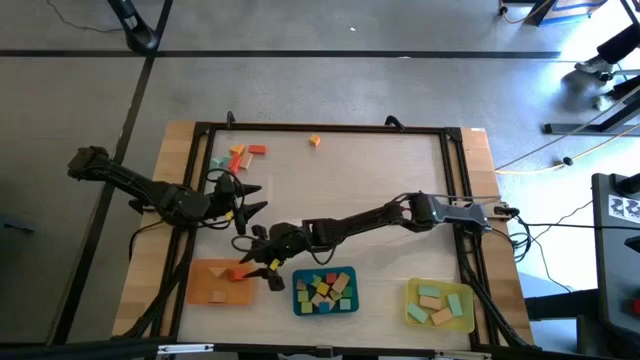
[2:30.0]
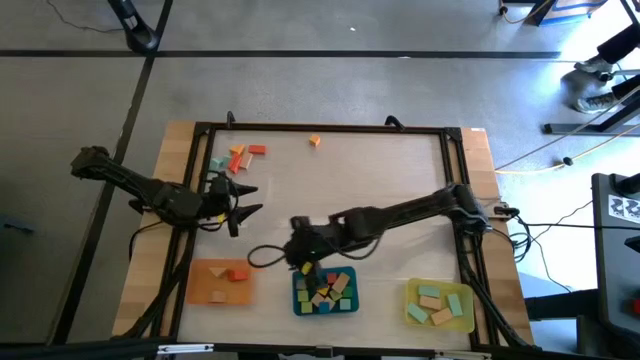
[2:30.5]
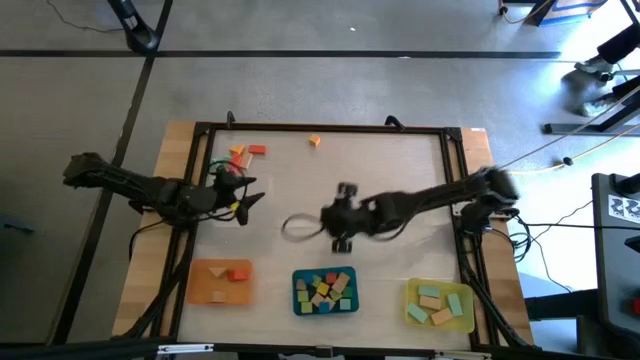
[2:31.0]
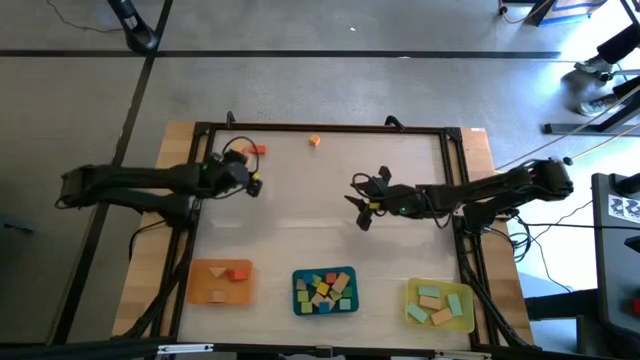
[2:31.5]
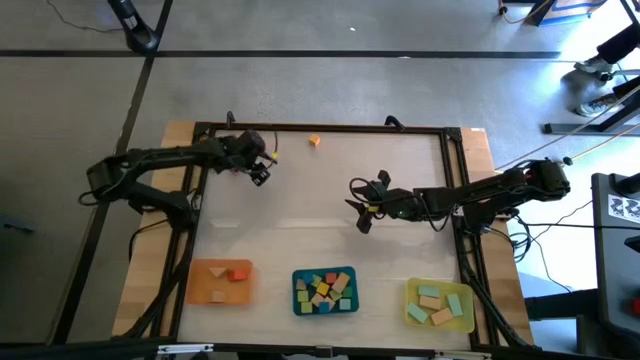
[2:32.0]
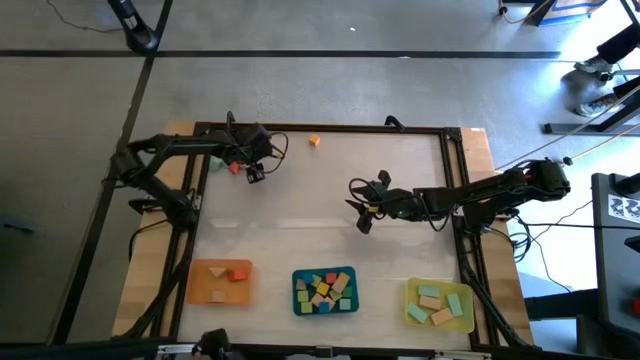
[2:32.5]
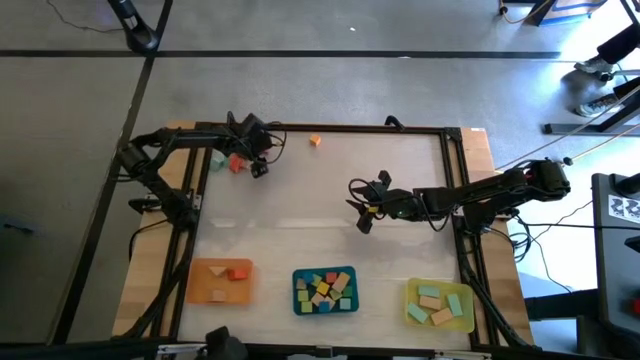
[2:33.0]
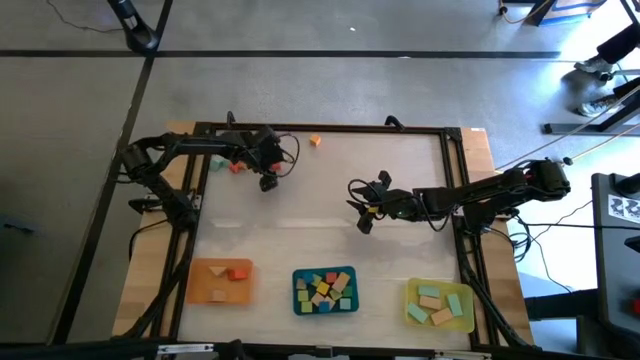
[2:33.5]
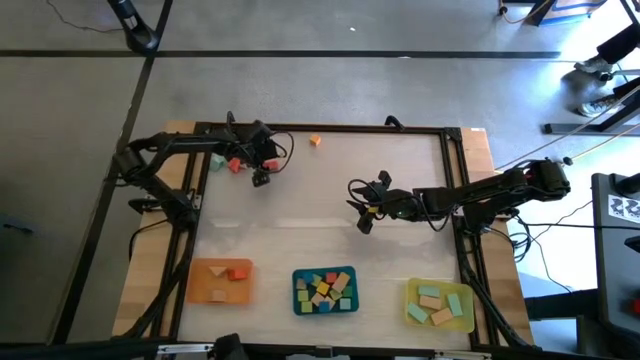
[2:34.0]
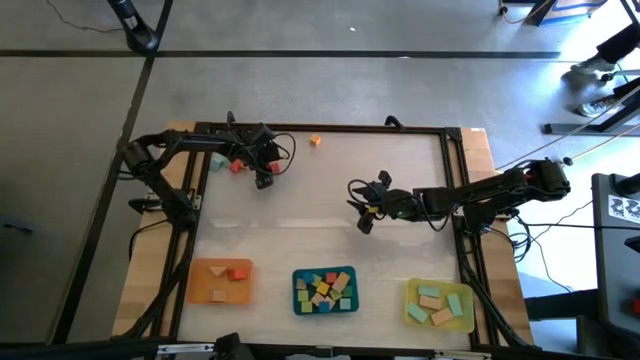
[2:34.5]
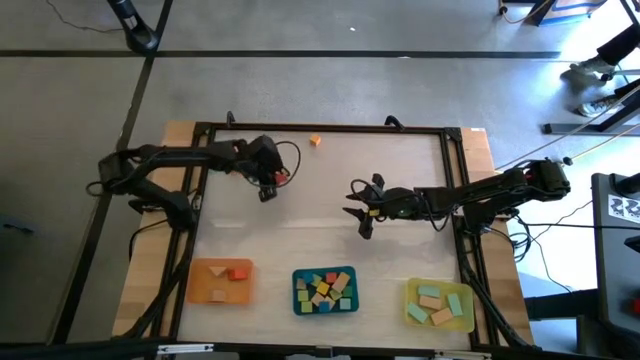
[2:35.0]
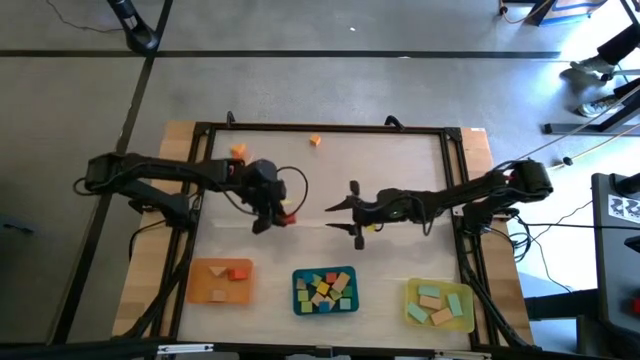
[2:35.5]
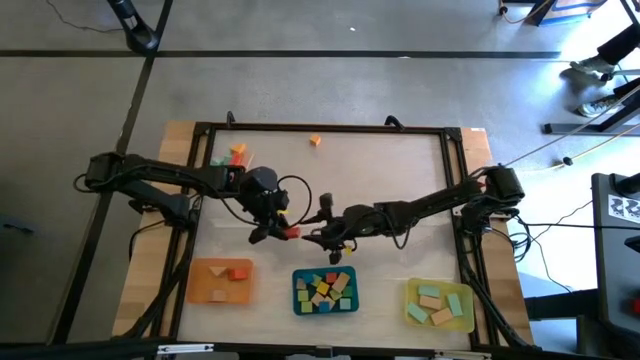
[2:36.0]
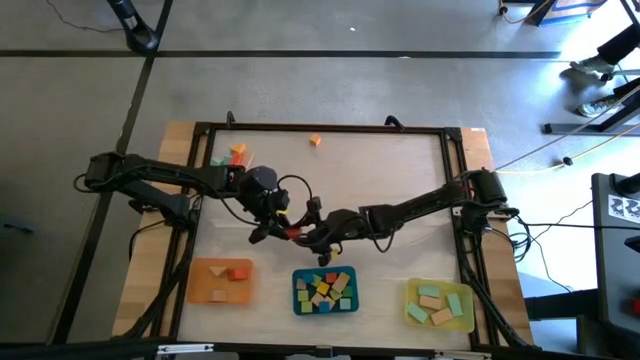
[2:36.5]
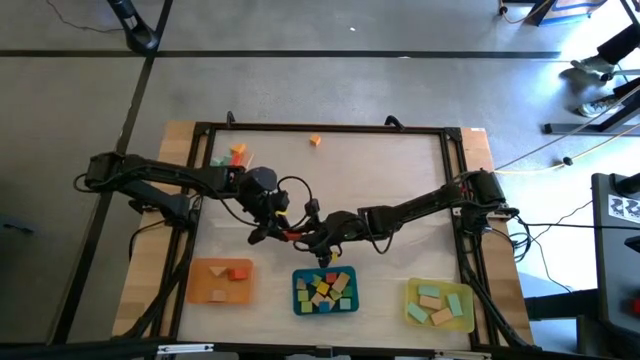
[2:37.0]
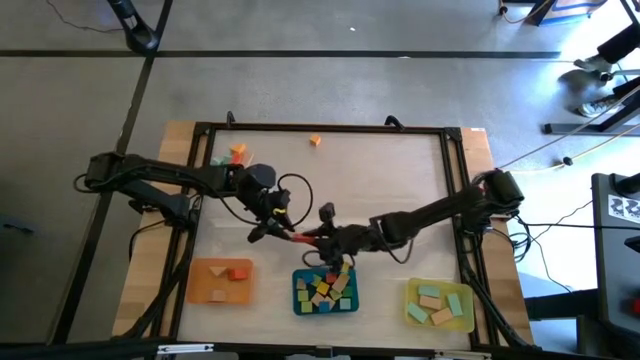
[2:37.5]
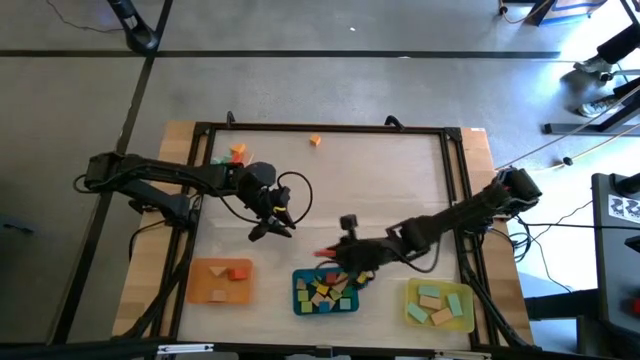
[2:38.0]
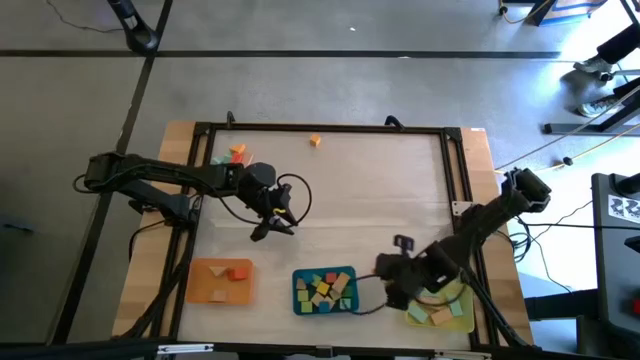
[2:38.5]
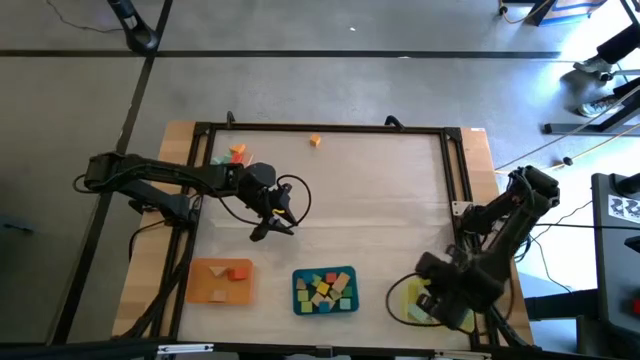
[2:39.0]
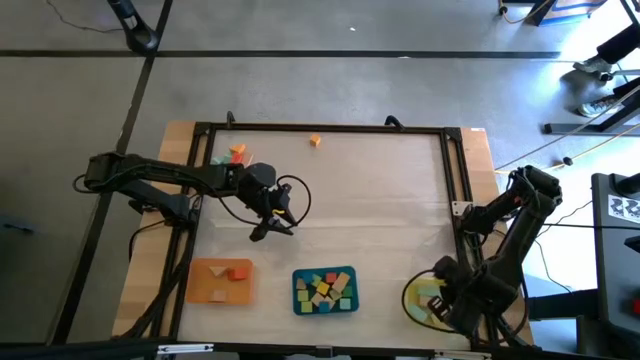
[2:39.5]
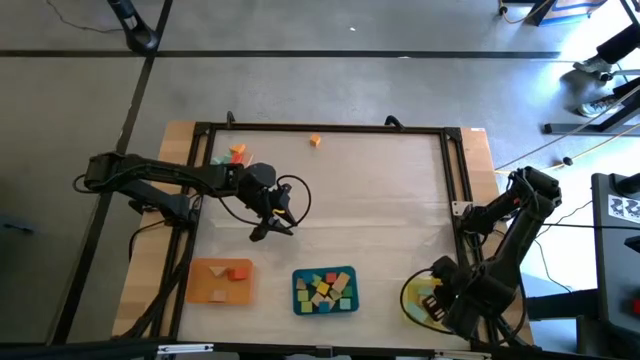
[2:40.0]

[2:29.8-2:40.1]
Task: Sort blocks by size
Put the orange rectangular block into the yellow bin

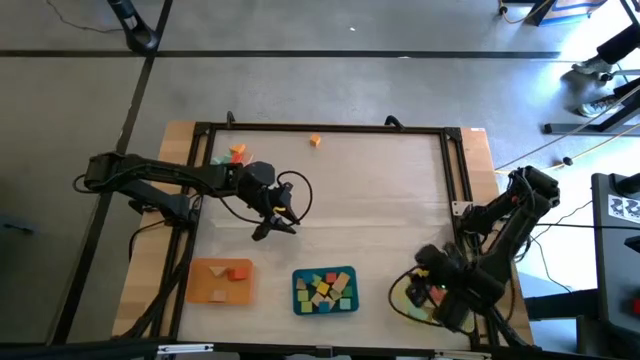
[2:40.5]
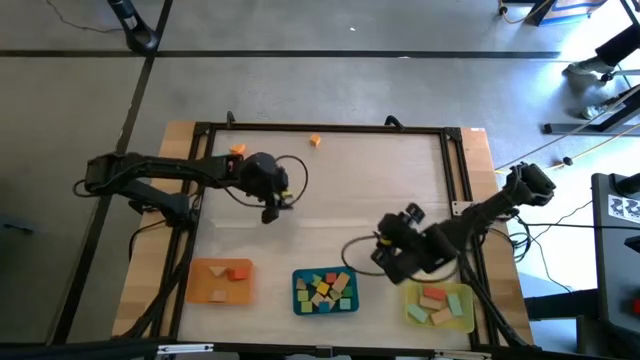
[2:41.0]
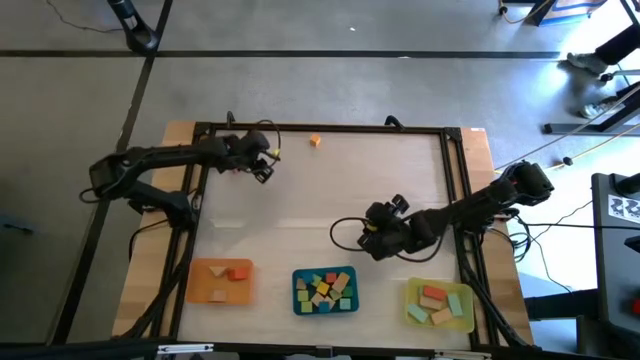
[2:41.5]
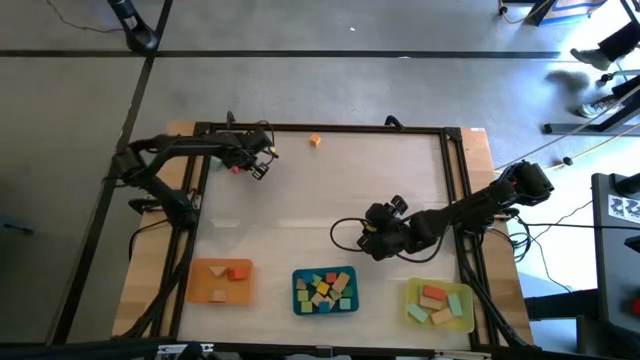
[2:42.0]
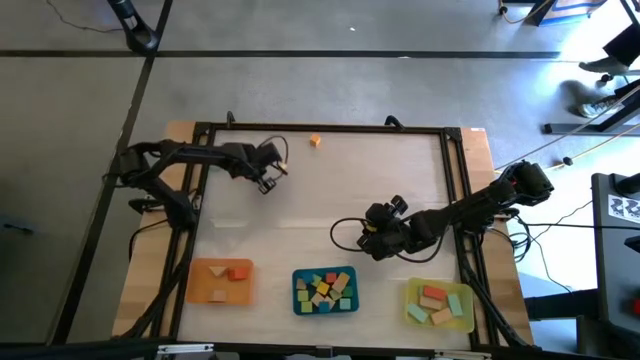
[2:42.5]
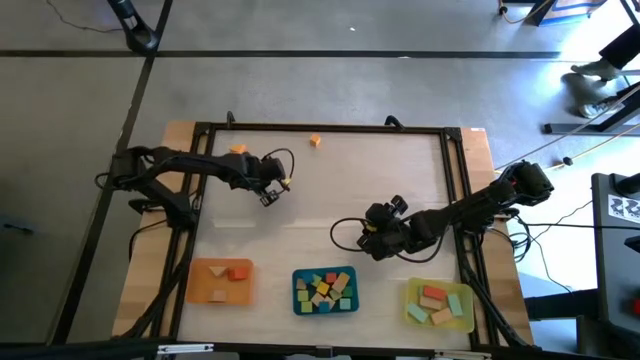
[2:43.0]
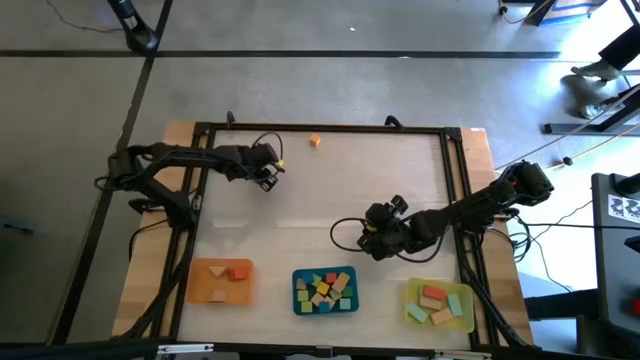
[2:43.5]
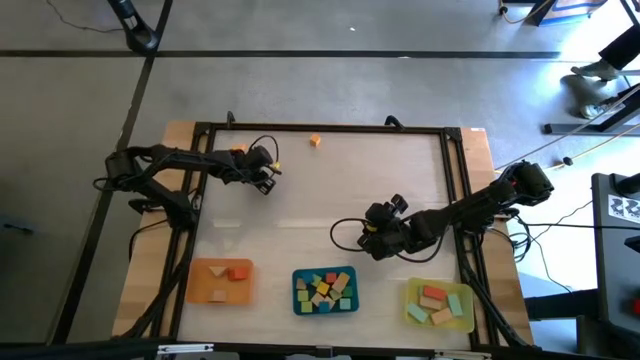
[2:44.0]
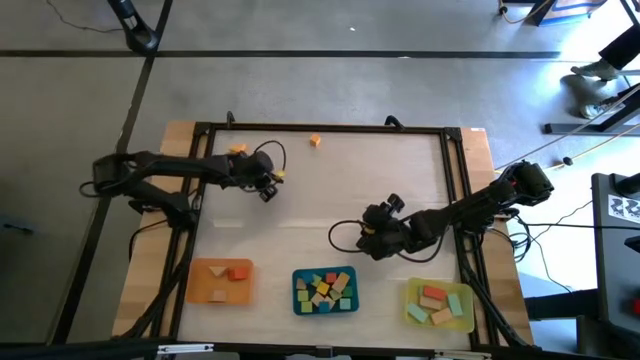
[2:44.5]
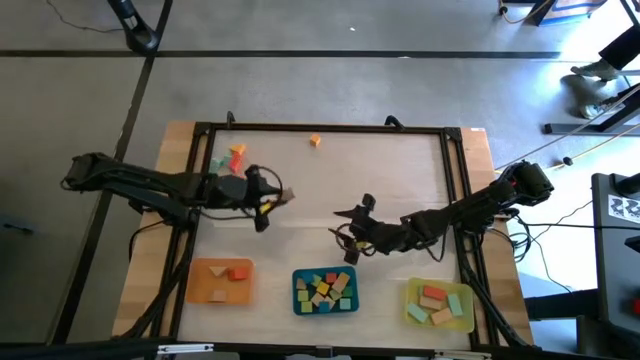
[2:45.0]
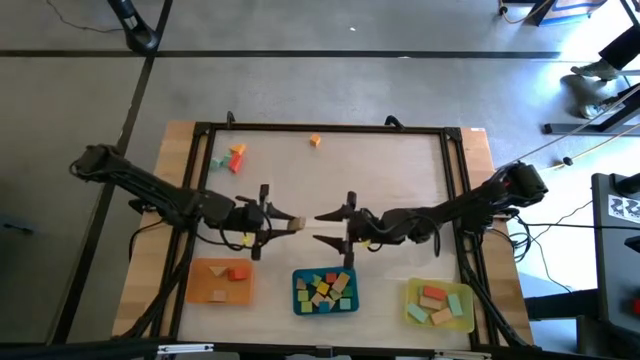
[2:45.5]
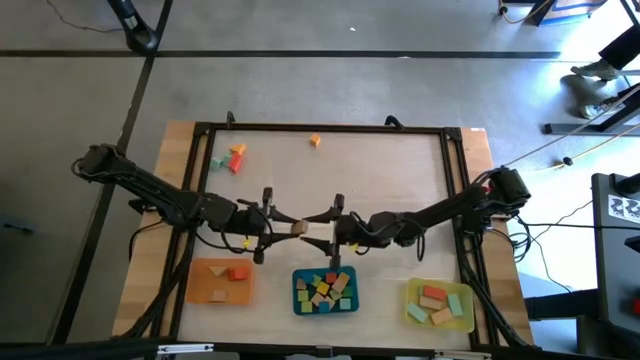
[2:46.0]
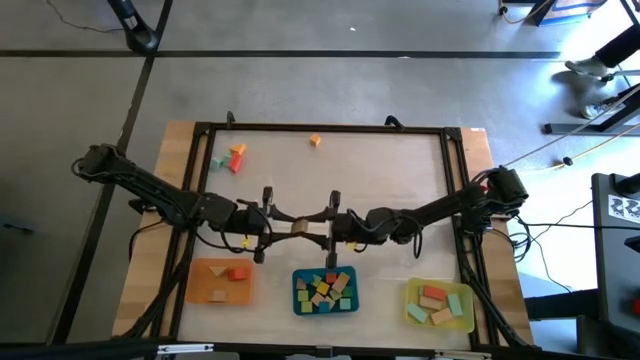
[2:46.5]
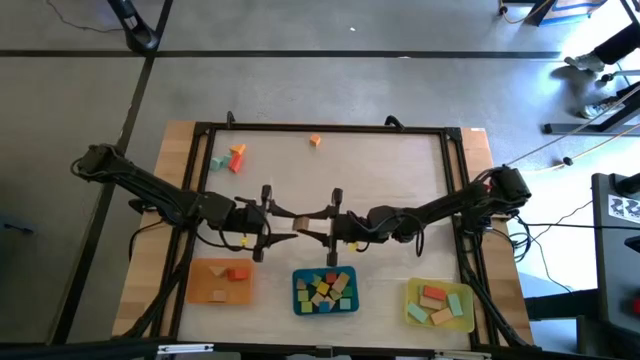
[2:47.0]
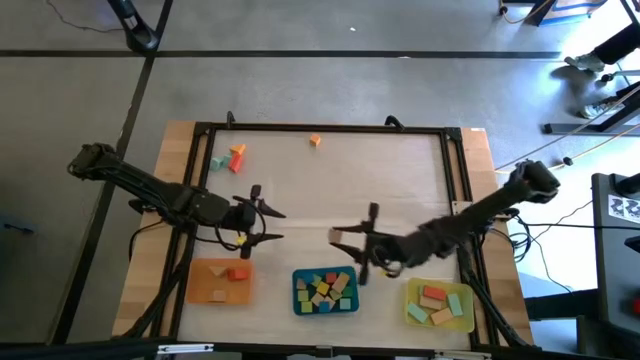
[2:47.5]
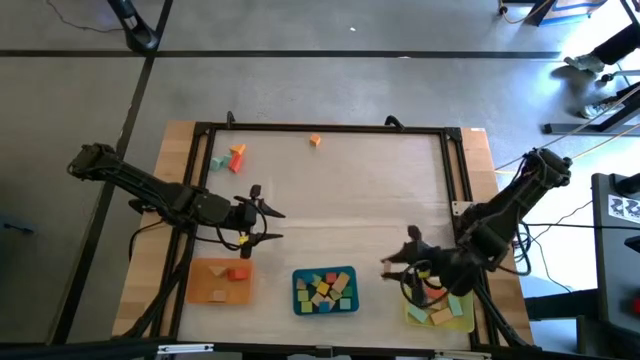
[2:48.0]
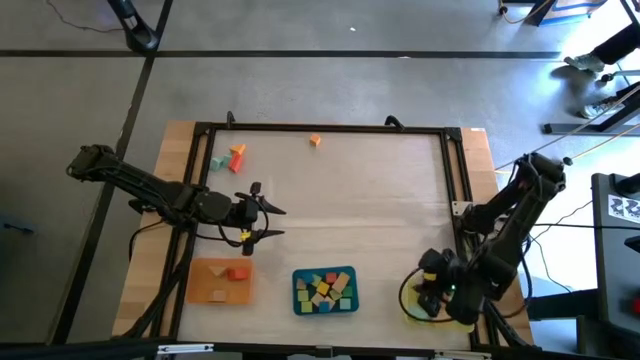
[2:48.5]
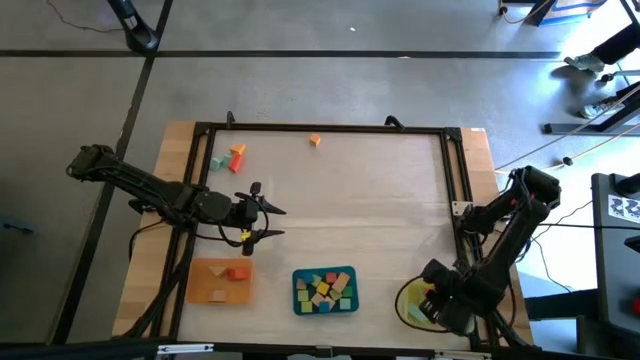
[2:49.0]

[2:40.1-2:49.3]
Put the brown rectangular block into the yellow bin
